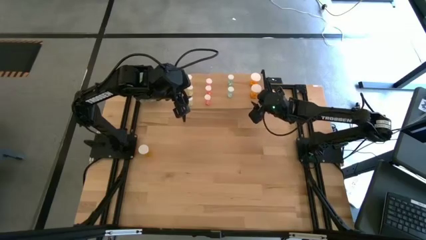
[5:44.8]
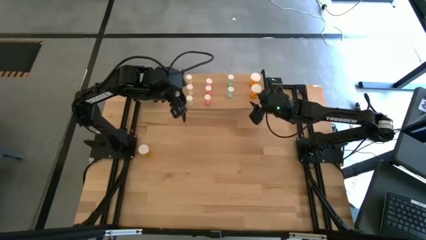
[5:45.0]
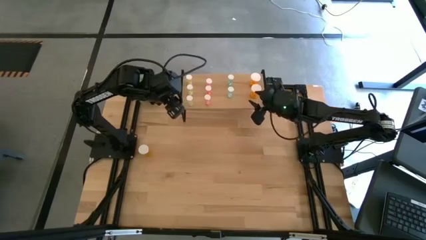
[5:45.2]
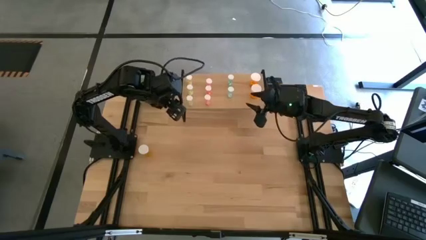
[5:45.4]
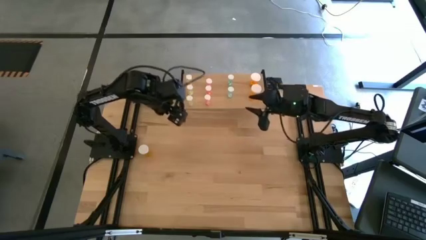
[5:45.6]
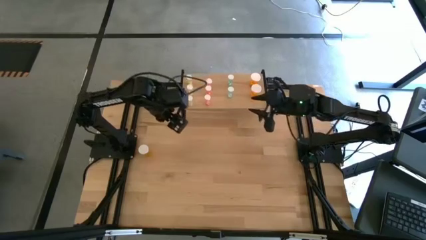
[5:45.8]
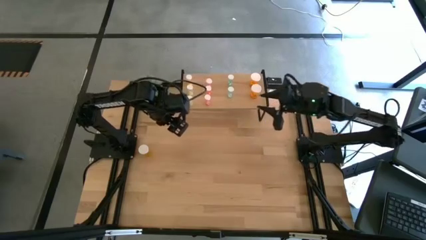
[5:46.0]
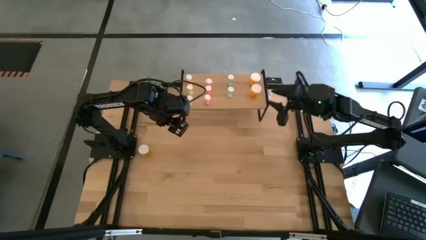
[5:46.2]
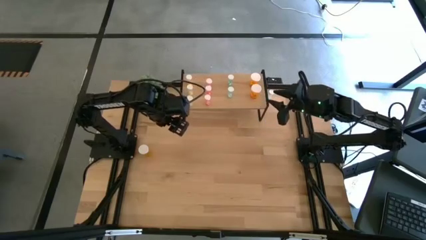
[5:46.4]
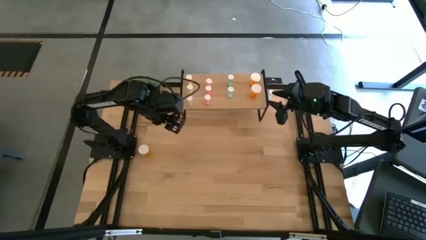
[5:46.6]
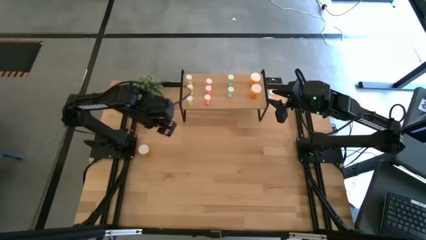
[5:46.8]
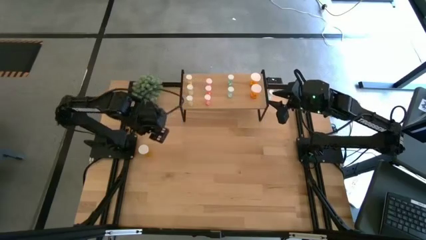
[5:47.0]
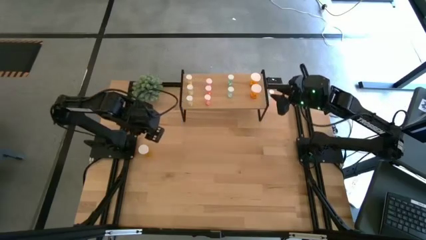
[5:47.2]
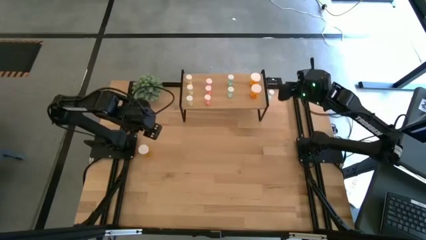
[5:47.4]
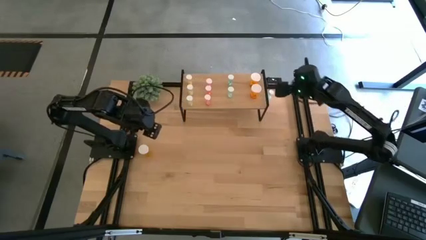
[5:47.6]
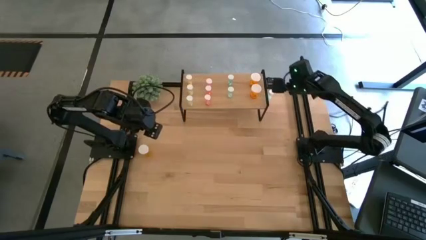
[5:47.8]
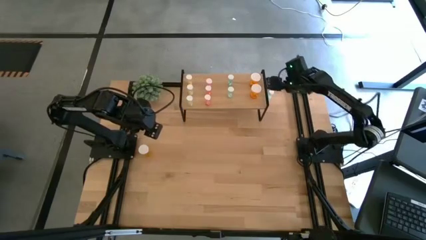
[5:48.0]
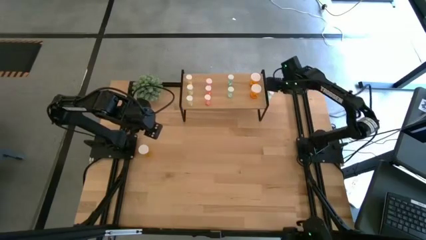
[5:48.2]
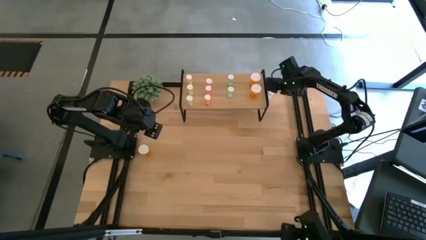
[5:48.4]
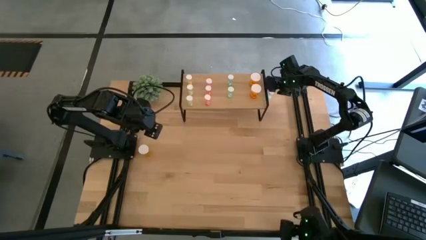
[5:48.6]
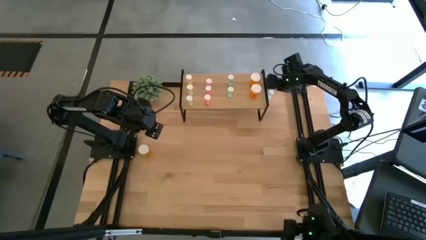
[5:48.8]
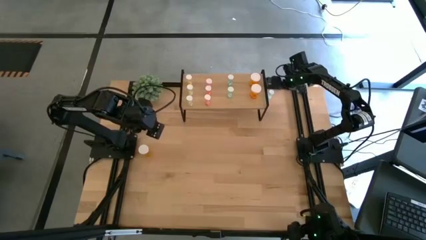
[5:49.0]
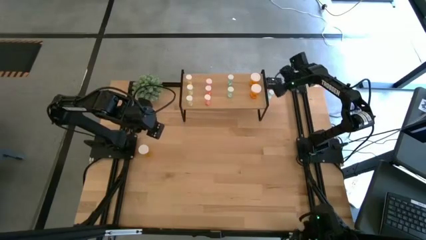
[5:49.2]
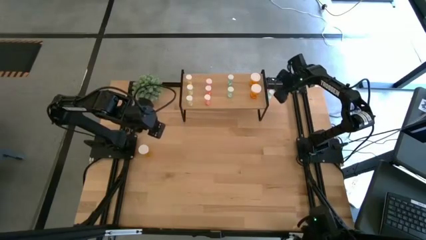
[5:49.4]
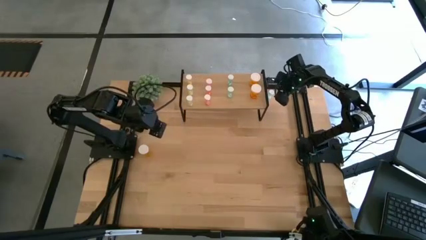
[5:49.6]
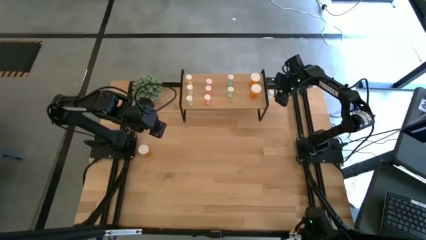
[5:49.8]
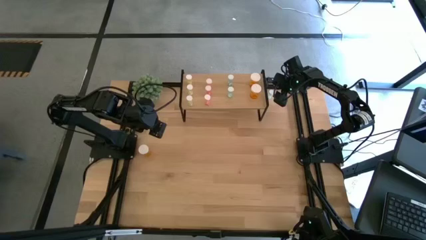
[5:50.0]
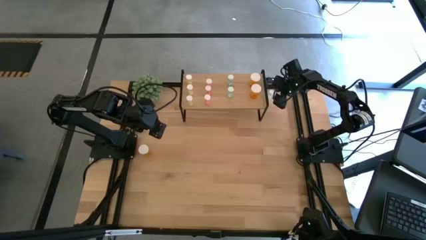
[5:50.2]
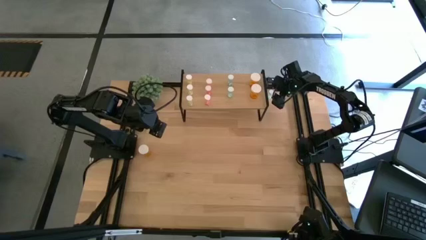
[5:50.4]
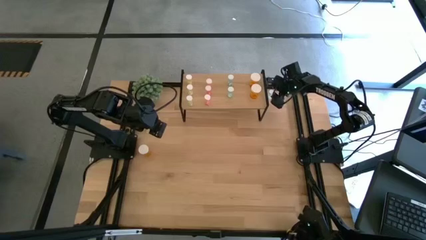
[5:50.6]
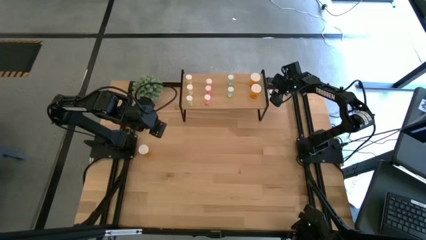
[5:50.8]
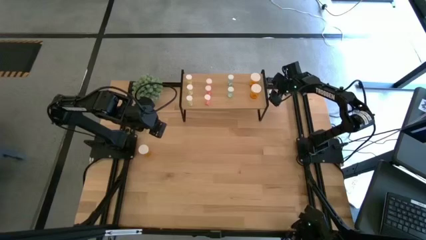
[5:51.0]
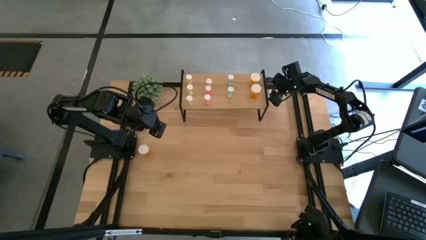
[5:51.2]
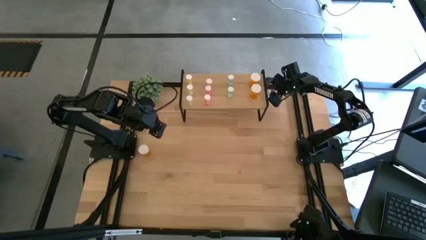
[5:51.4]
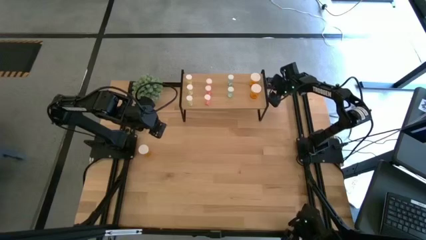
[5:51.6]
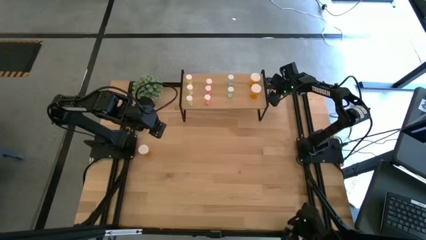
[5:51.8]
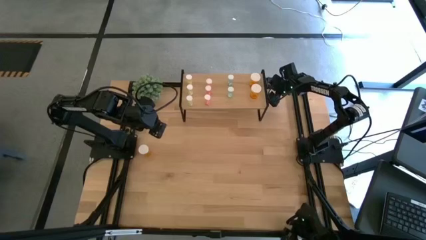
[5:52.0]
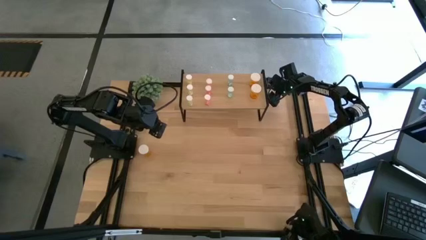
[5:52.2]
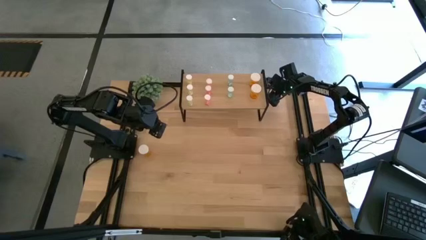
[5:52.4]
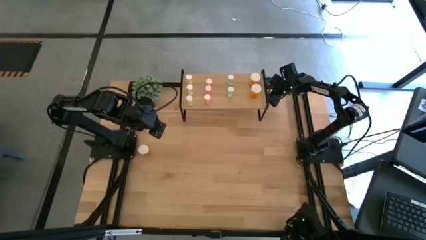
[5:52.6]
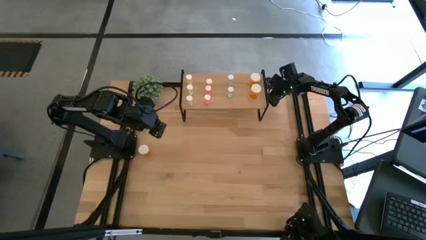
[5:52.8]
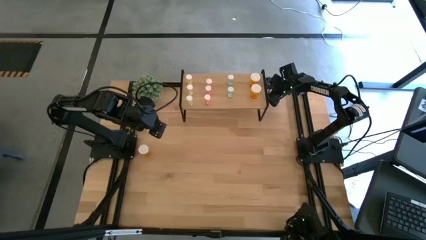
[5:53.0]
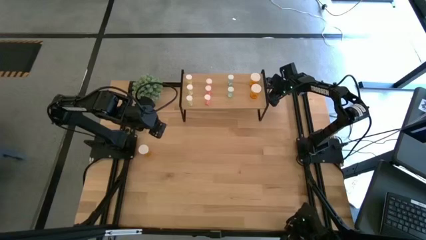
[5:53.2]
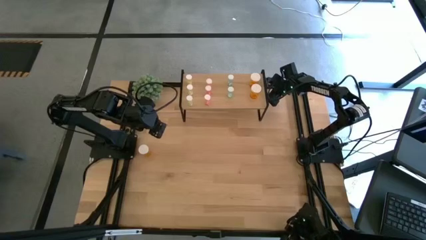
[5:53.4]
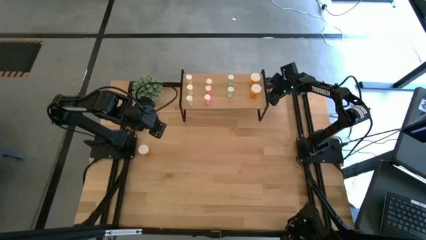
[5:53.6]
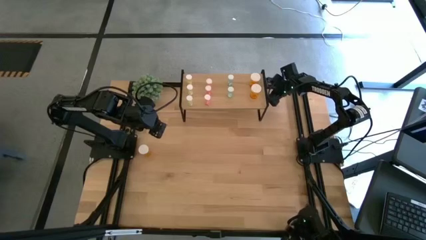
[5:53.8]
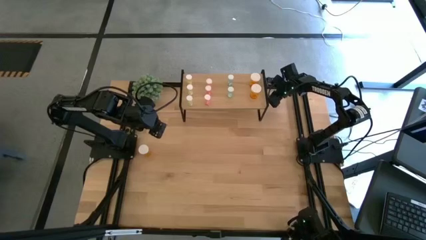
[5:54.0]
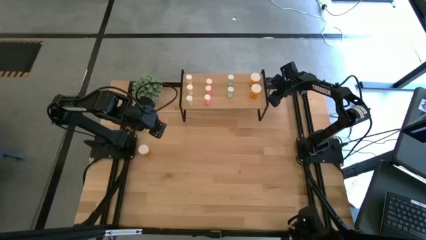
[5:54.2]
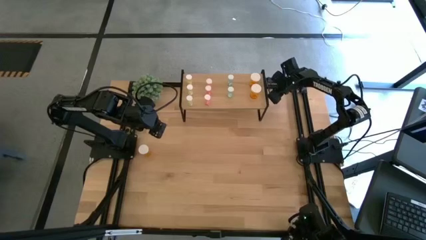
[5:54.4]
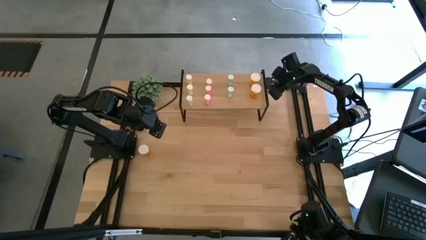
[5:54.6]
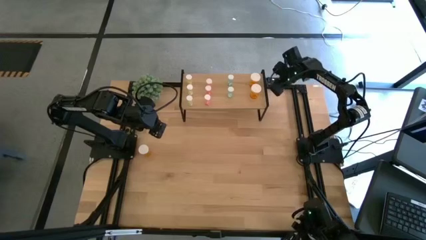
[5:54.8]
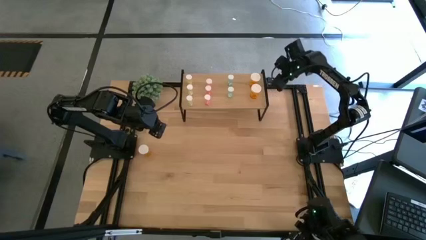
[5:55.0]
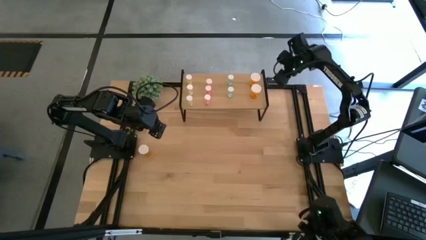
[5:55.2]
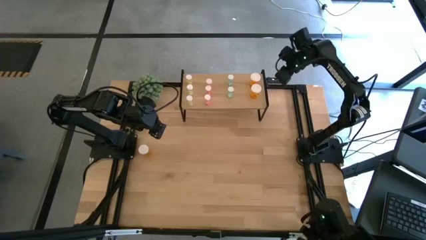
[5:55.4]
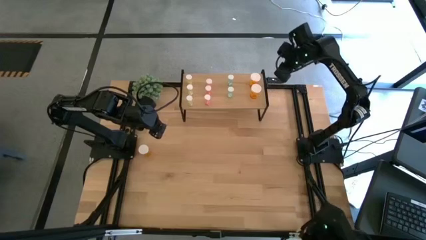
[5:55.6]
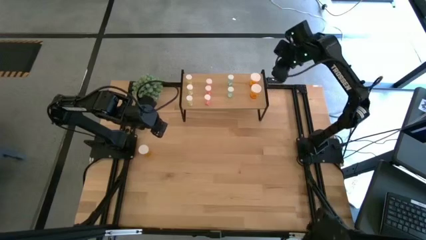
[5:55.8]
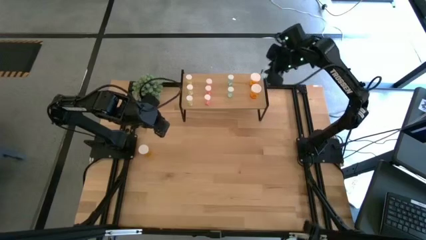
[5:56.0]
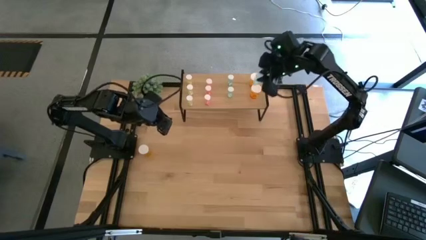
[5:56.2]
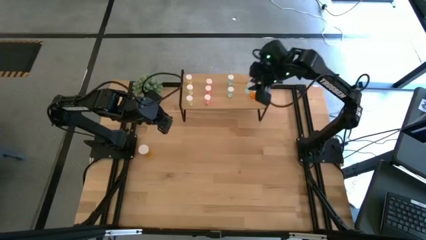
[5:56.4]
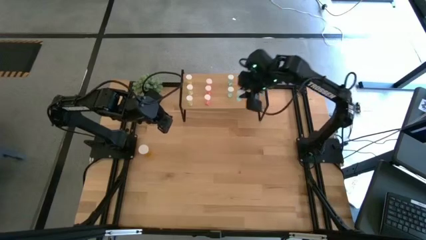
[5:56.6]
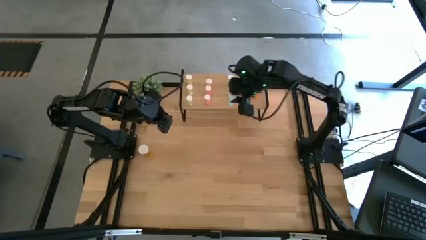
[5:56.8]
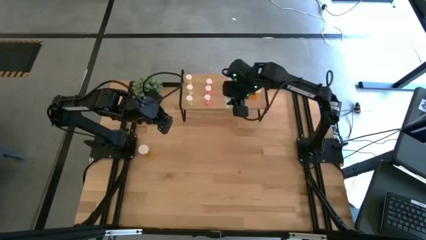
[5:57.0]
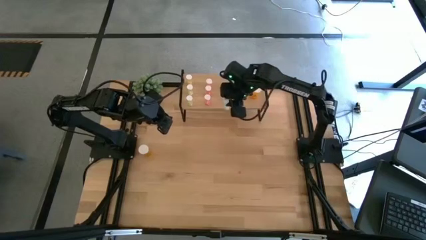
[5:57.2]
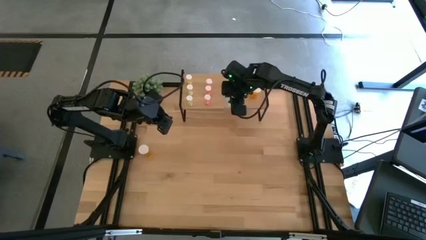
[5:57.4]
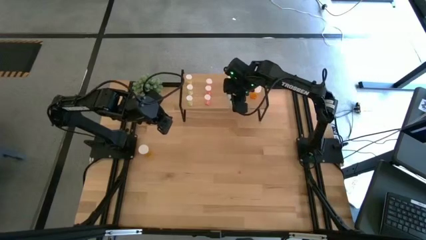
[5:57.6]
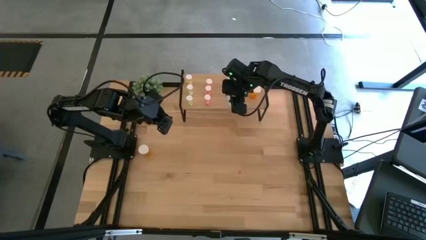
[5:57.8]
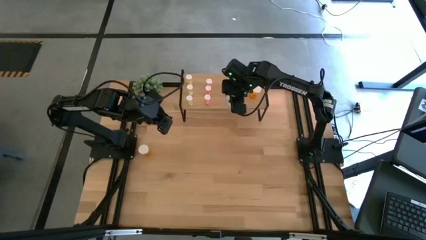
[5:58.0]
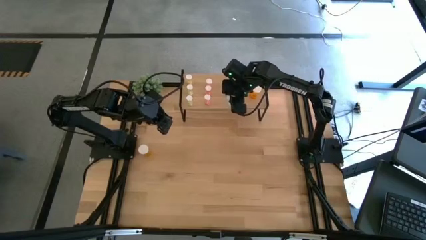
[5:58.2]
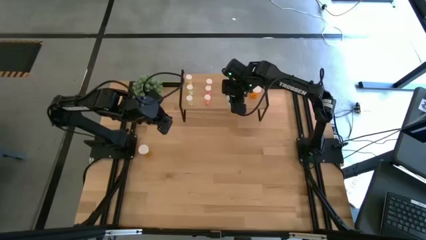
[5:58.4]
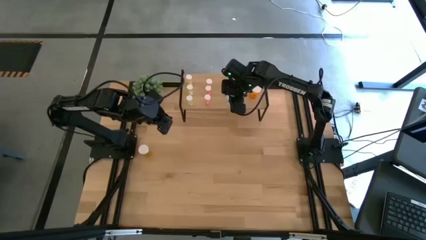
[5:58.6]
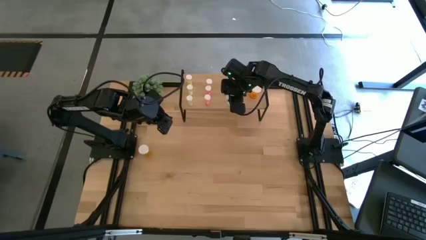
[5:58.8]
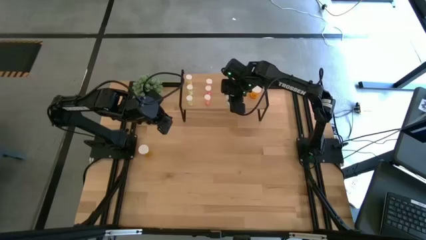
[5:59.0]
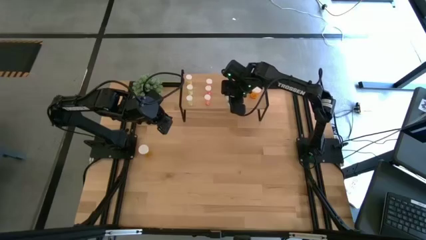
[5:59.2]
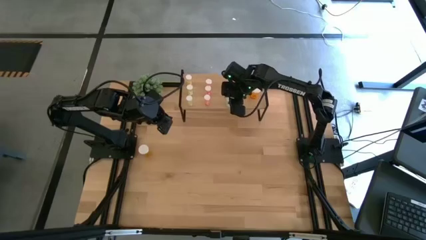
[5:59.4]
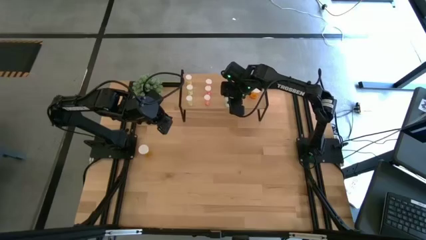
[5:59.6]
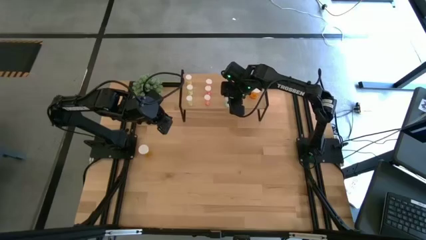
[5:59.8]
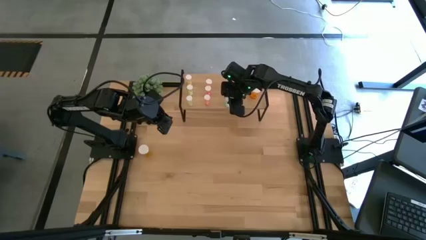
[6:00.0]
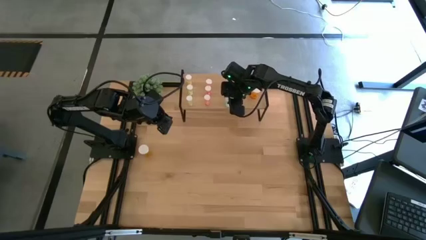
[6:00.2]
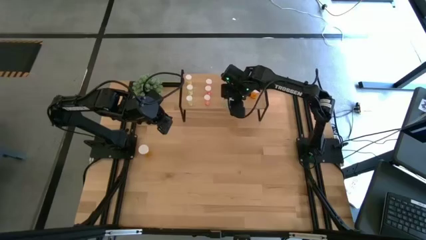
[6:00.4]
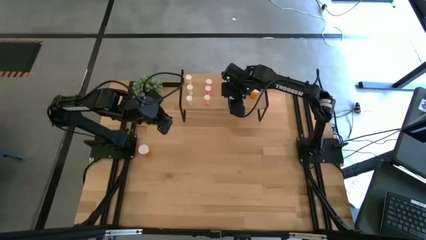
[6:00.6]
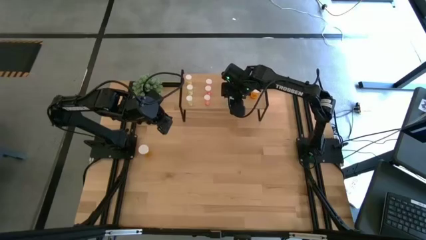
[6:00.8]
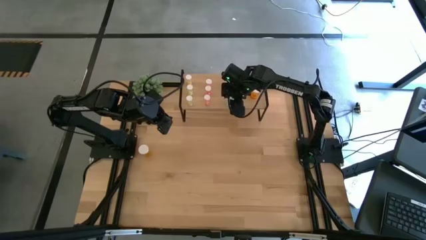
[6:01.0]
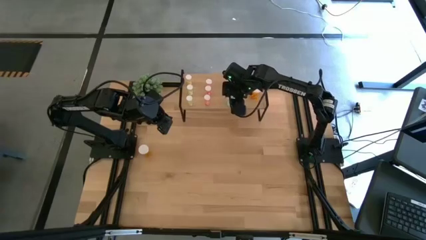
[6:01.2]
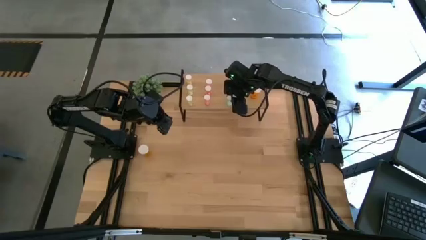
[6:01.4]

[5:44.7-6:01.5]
Task: Pick and place medicine bottles onto shelf by color
Put the blue pill bottle on the shelf aligned with the other blue pill bottles
